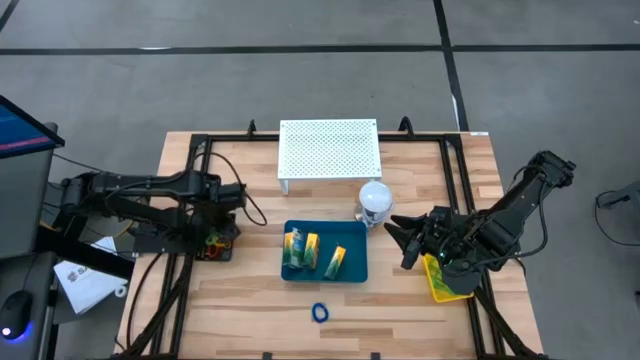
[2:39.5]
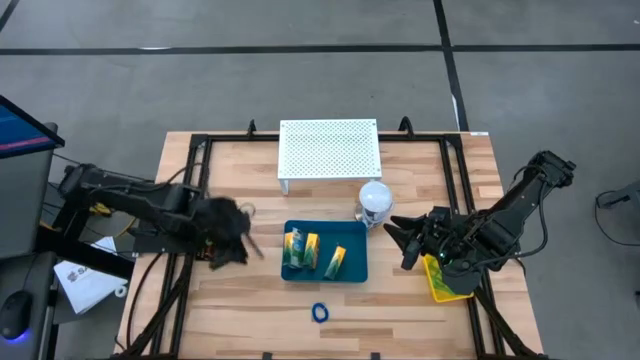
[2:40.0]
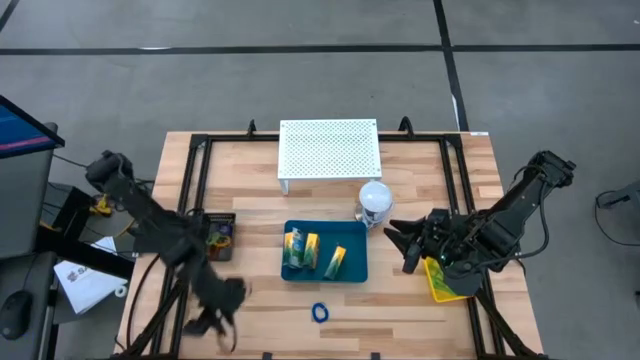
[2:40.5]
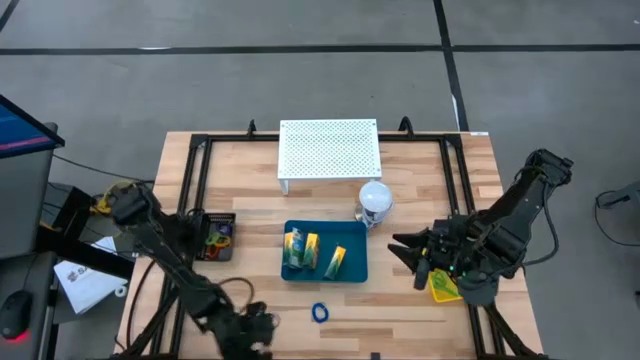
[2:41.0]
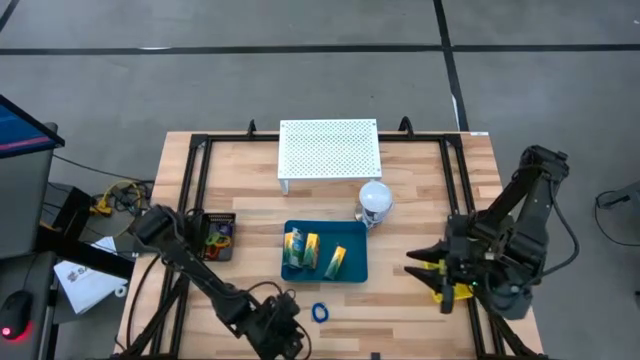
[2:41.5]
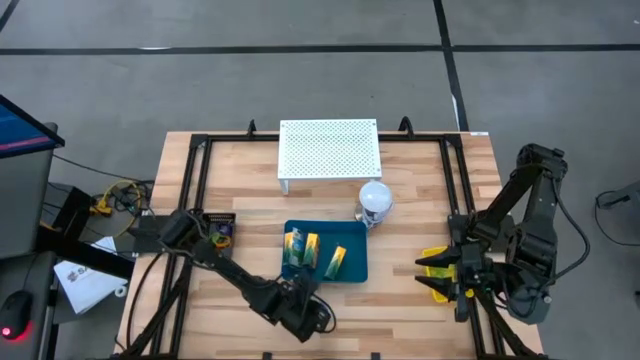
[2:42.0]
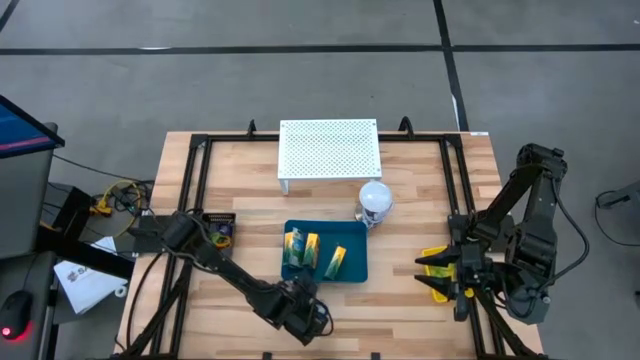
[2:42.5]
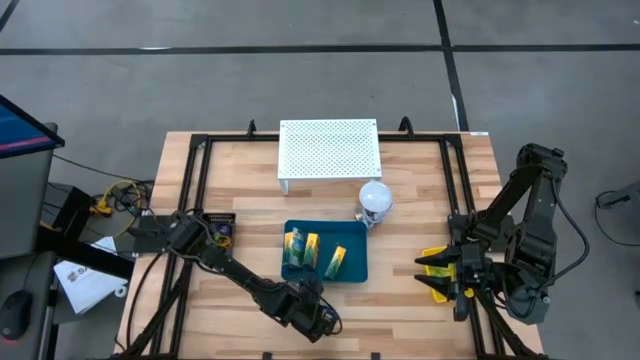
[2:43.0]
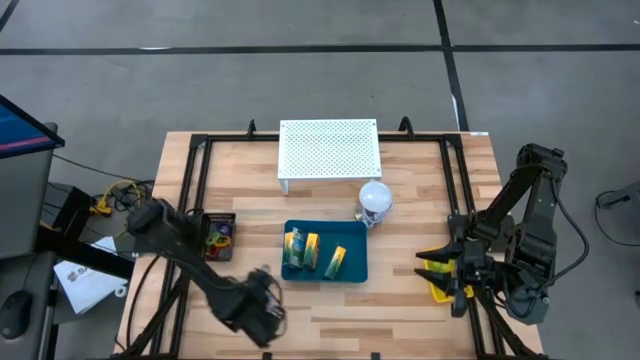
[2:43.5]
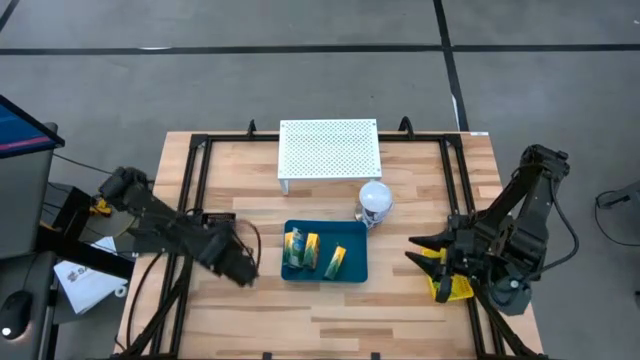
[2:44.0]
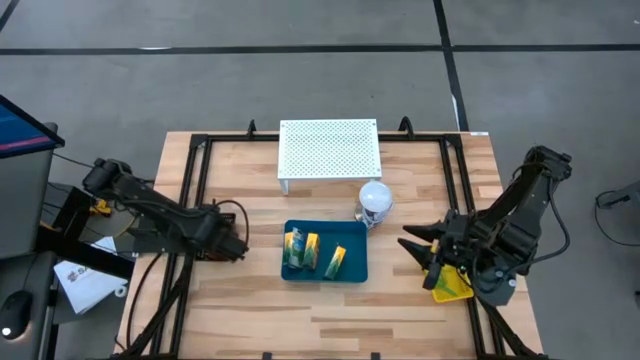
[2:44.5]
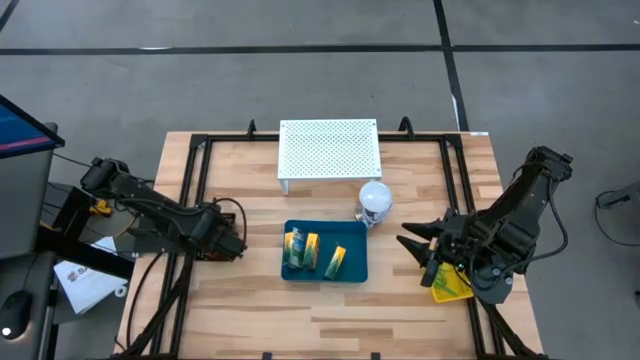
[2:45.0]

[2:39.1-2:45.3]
Task: Pick & Place Office Desk Supplies
Put the blue spring keychain into the black bin

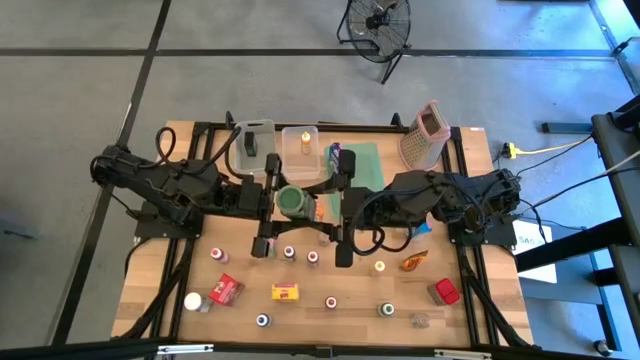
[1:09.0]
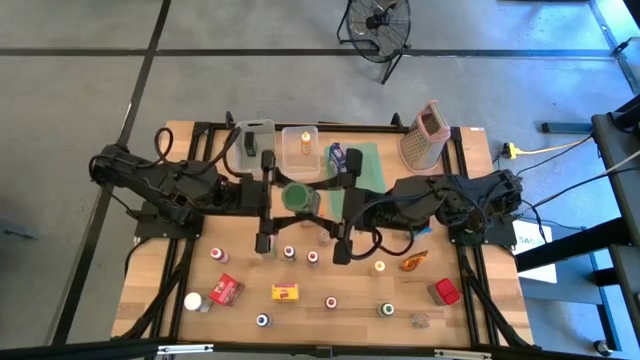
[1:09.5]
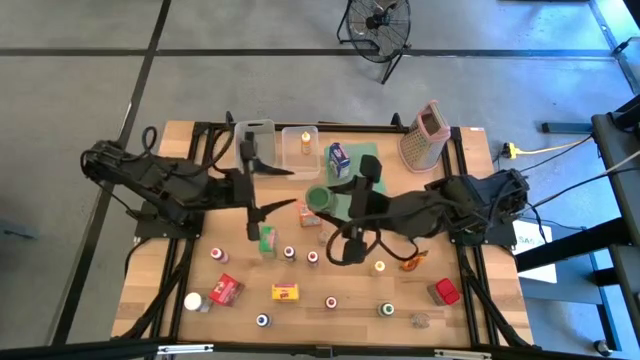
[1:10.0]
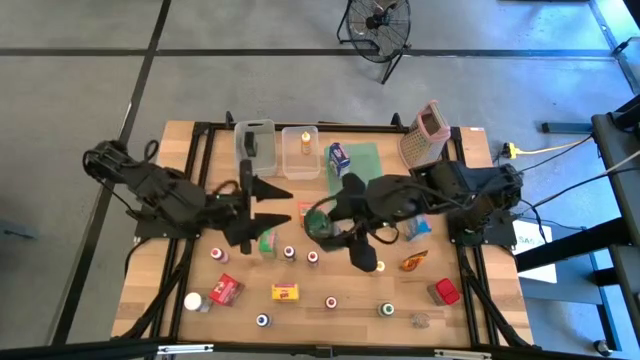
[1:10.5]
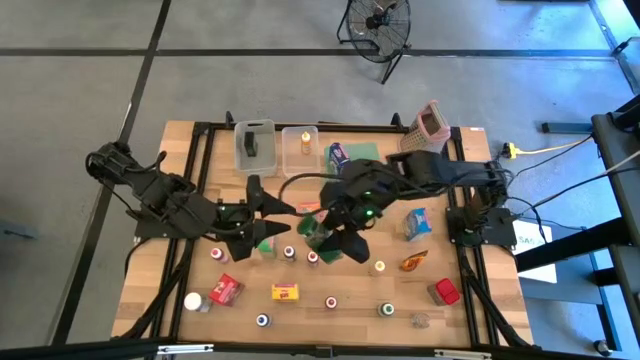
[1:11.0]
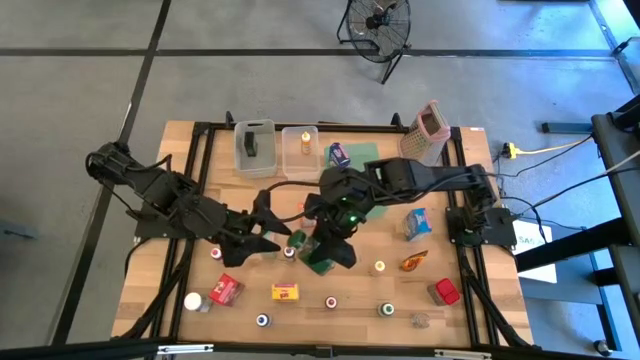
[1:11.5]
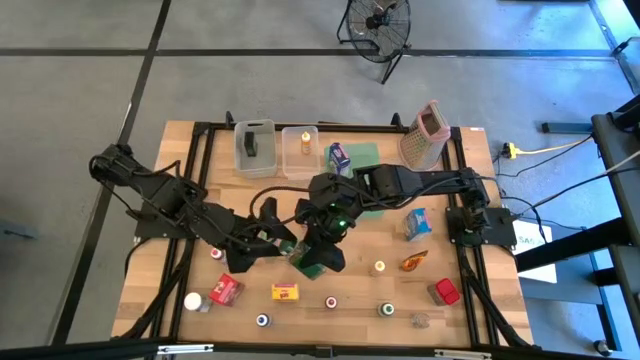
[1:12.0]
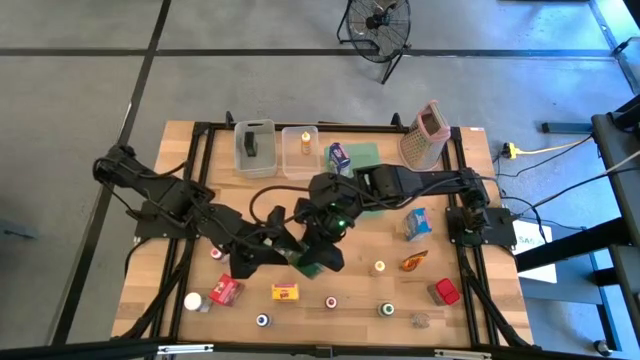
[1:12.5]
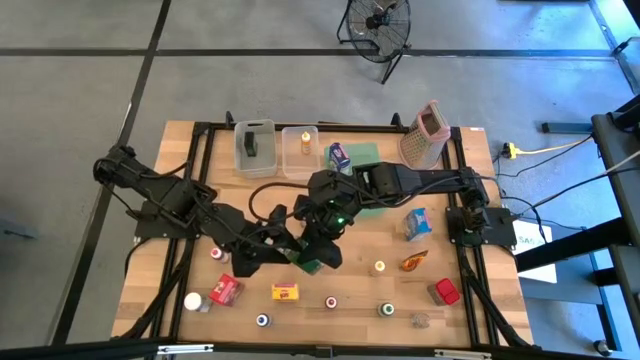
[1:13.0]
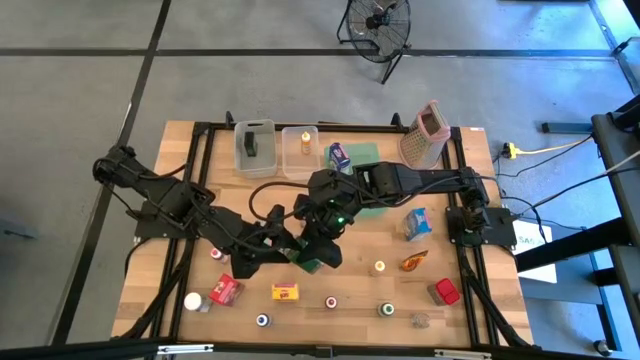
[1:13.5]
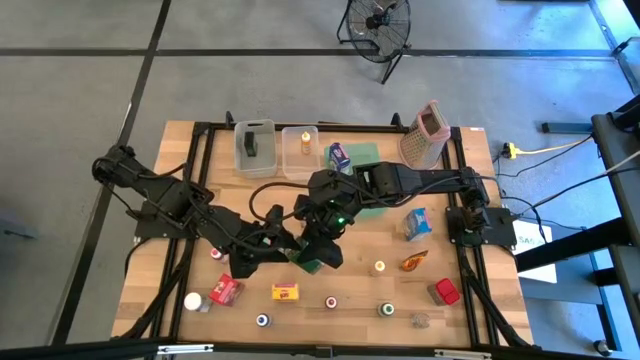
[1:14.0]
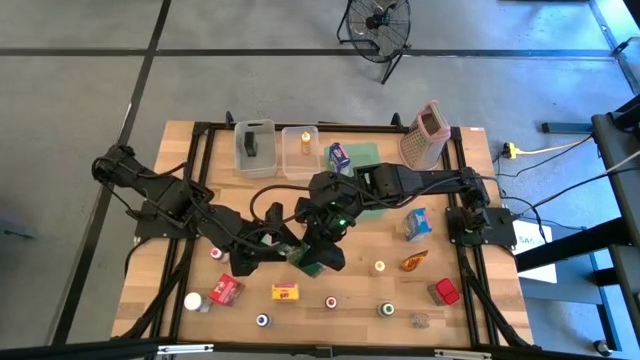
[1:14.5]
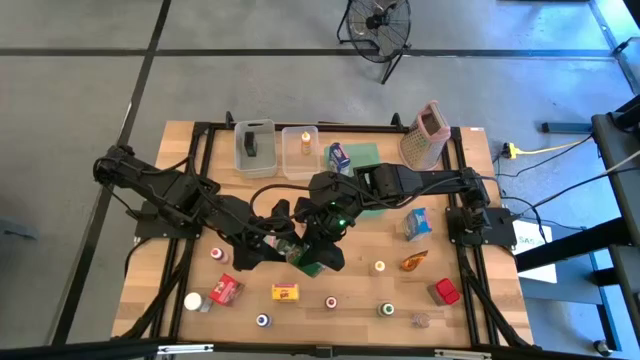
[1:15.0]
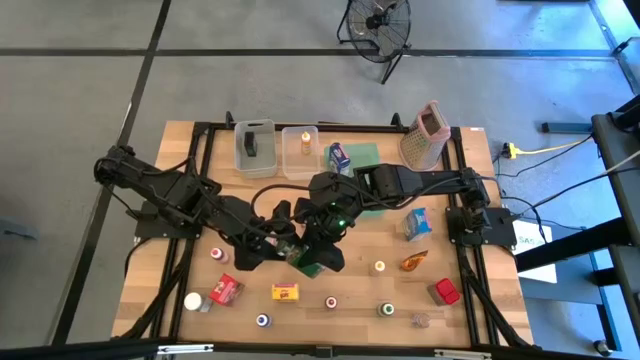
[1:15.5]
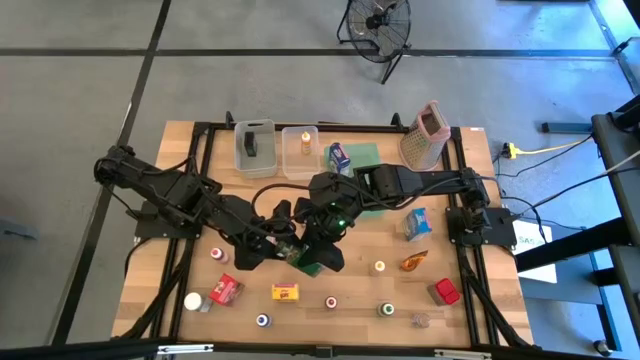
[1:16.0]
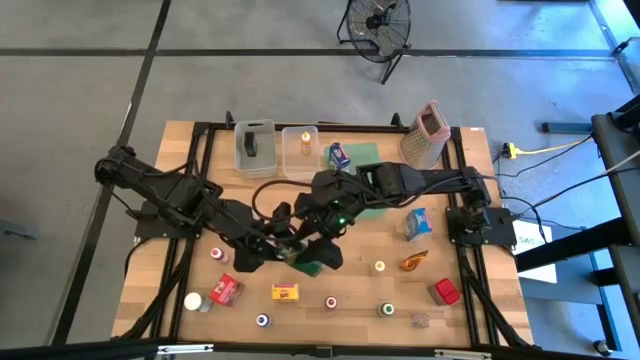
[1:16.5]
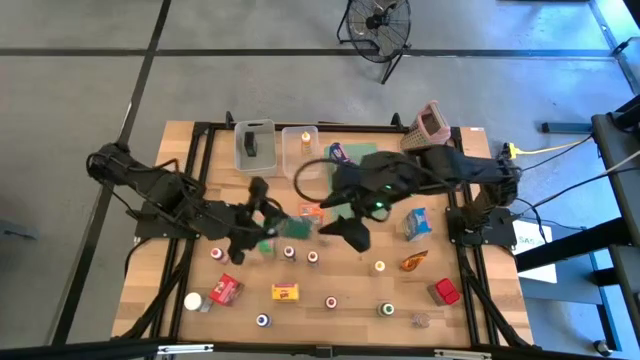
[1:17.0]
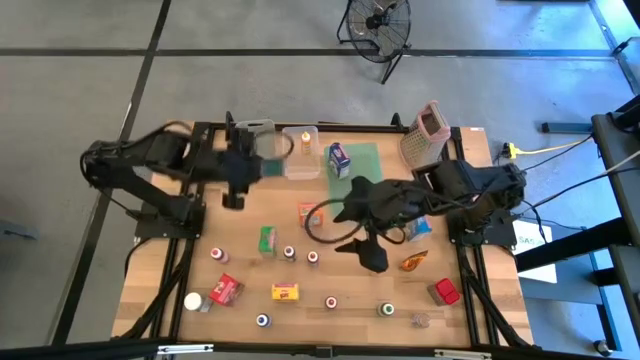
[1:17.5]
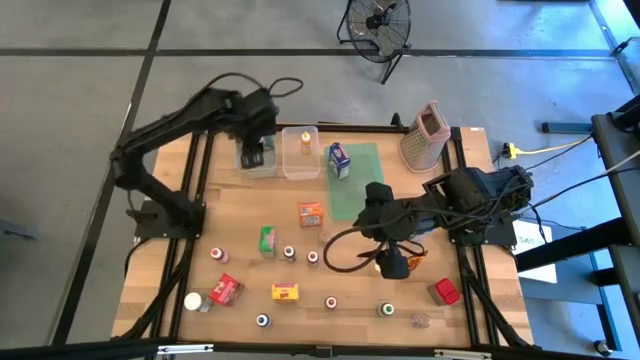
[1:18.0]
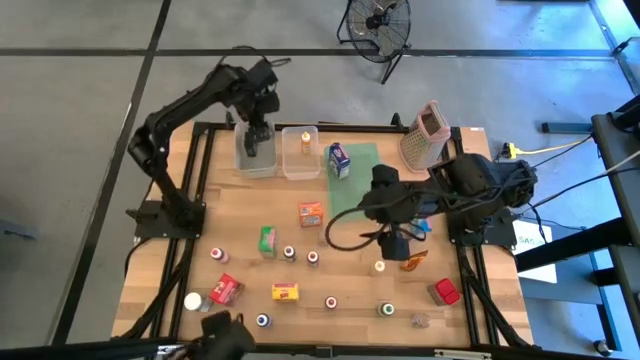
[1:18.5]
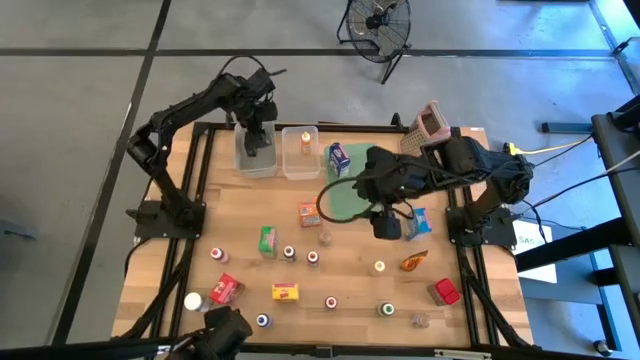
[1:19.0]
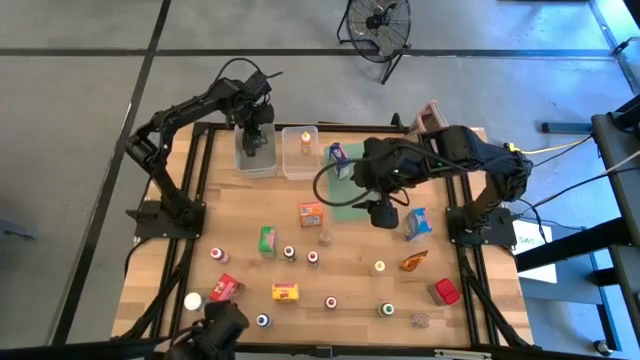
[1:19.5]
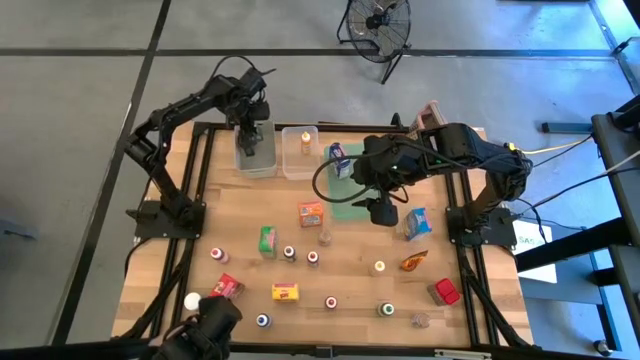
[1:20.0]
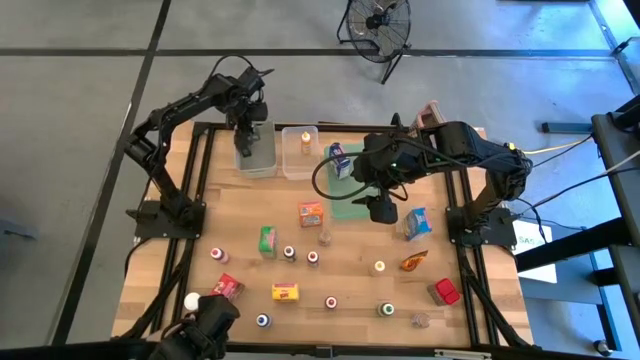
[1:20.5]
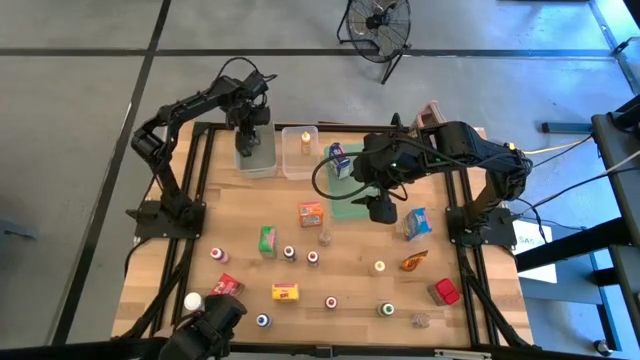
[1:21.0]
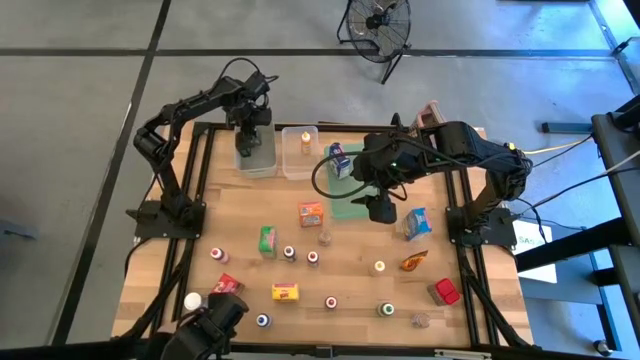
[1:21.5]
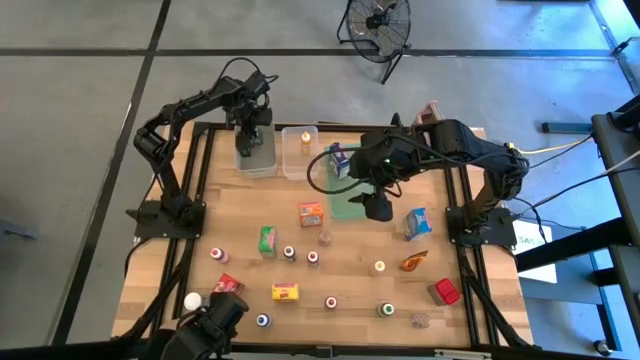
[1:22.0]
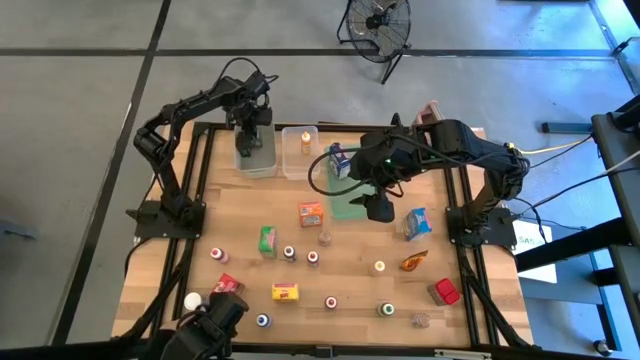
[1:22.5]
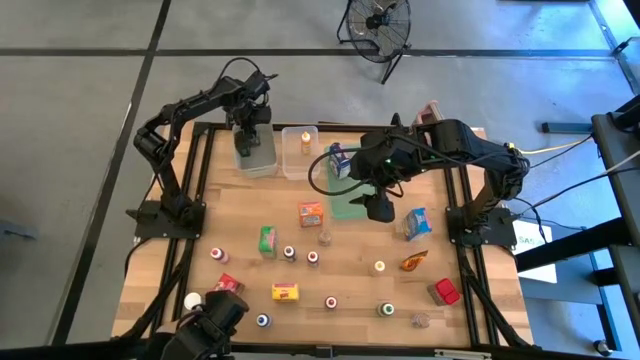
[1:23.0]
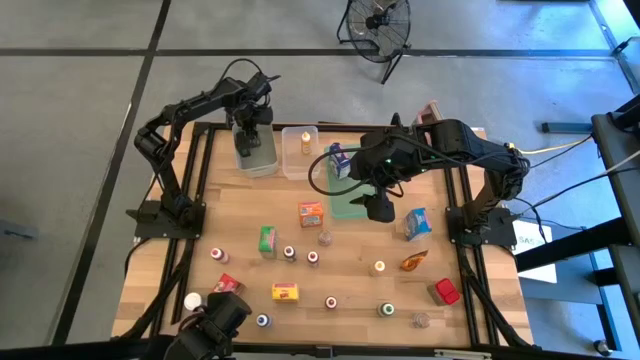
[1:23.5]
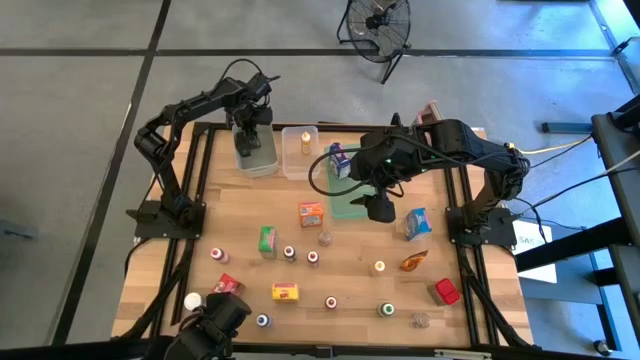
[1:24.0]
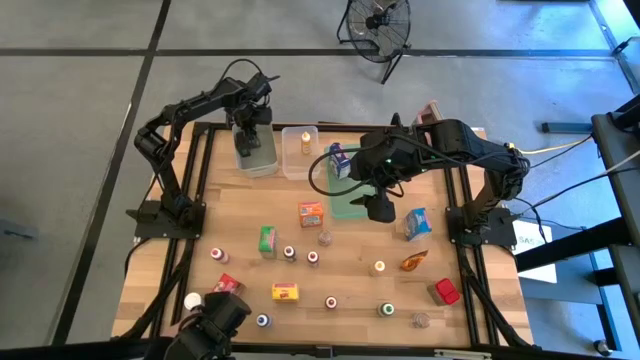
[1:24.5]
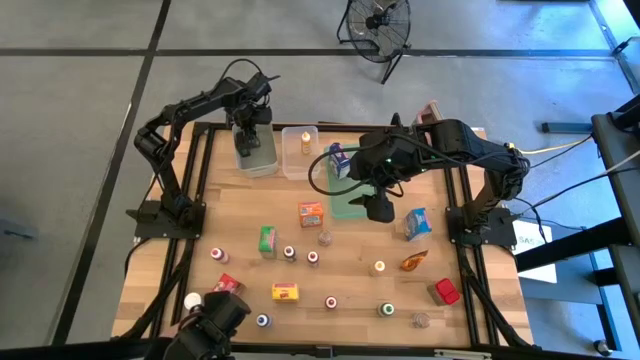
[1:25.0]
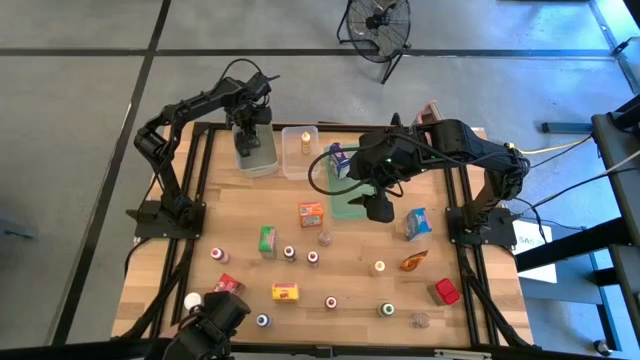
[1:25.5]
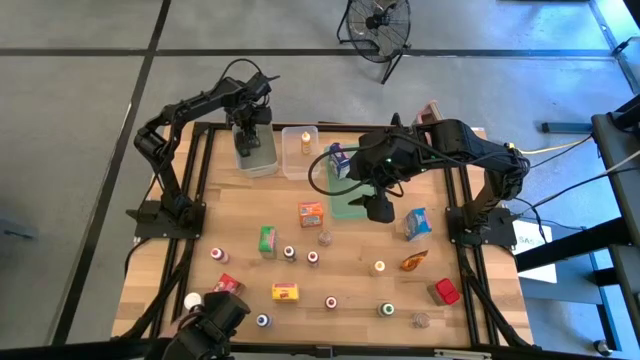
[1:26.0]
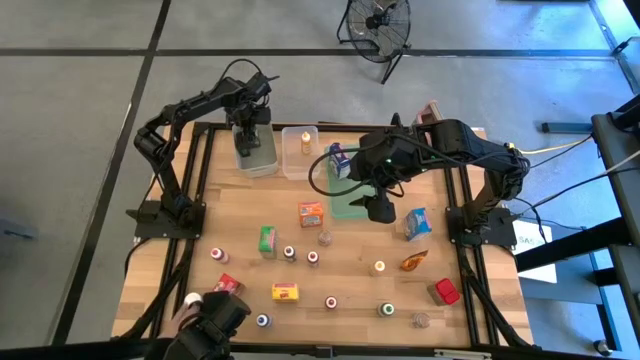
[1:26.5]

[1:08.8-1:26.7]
Task: Pick & Place Kitchen Items
Put the green spice bottle into the gray bin
